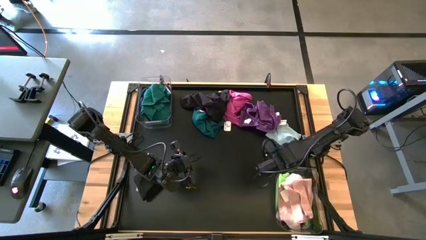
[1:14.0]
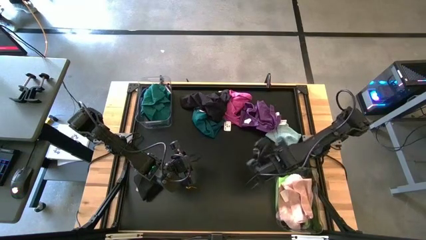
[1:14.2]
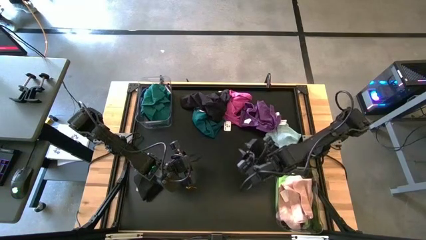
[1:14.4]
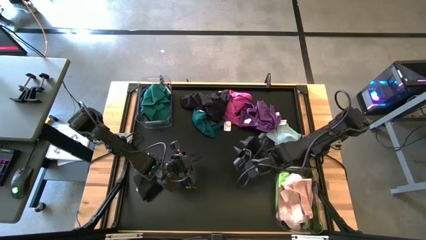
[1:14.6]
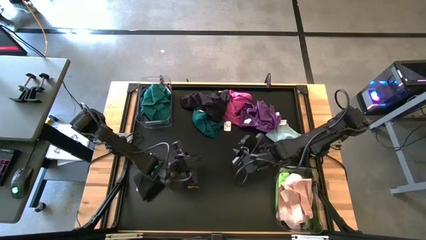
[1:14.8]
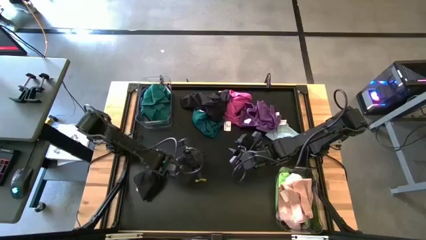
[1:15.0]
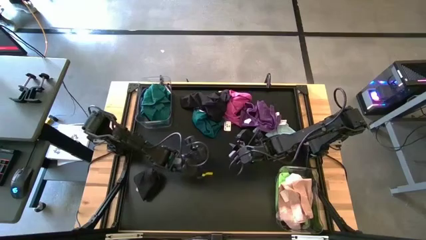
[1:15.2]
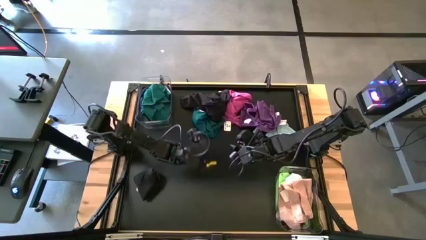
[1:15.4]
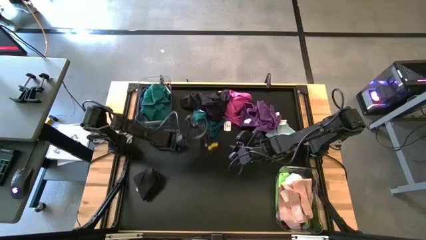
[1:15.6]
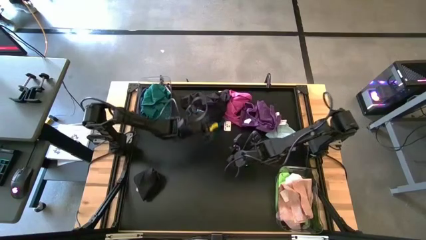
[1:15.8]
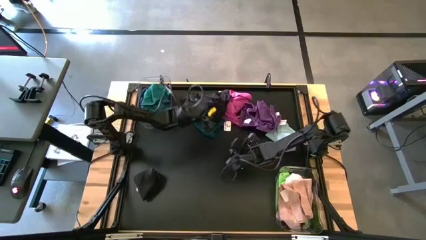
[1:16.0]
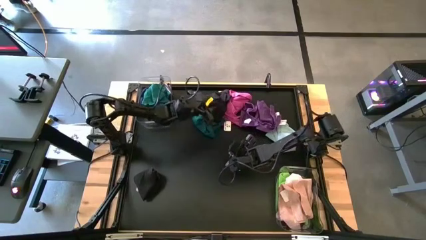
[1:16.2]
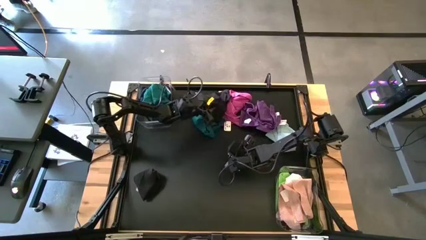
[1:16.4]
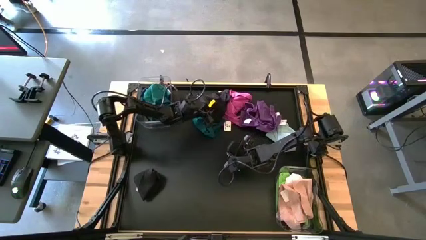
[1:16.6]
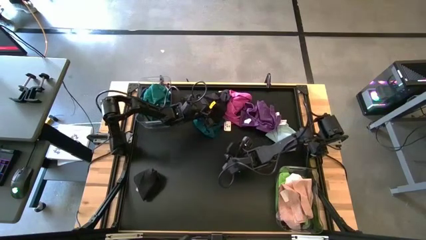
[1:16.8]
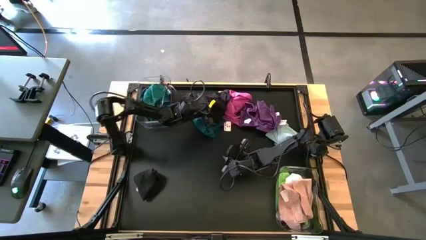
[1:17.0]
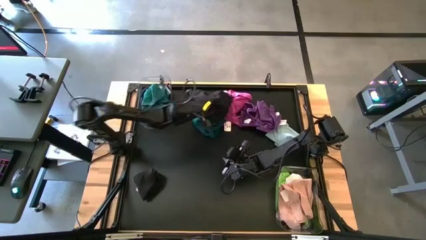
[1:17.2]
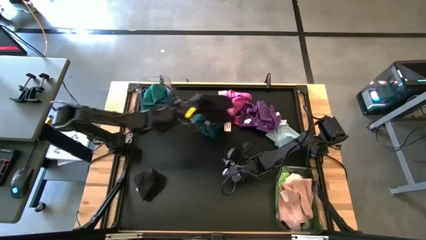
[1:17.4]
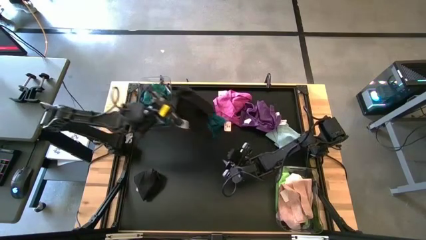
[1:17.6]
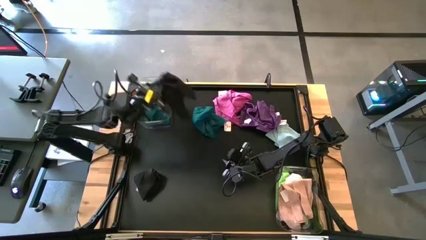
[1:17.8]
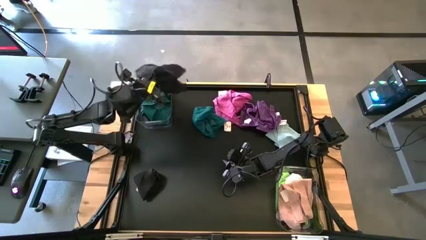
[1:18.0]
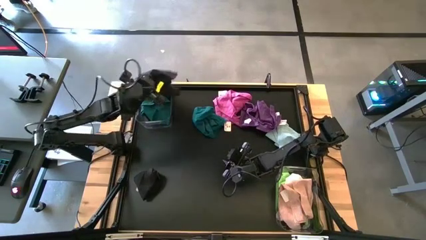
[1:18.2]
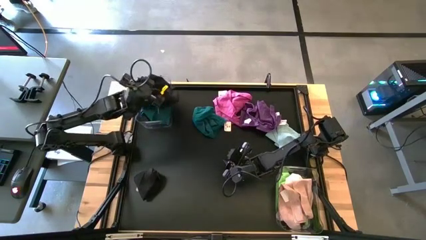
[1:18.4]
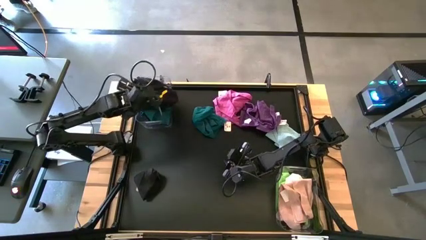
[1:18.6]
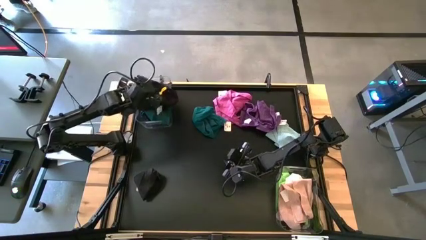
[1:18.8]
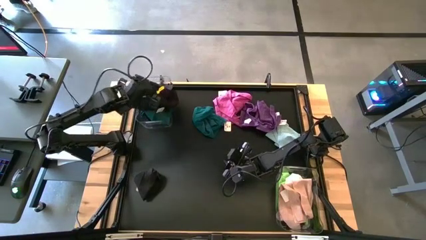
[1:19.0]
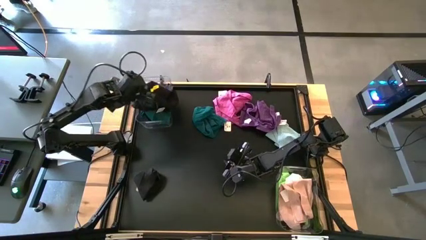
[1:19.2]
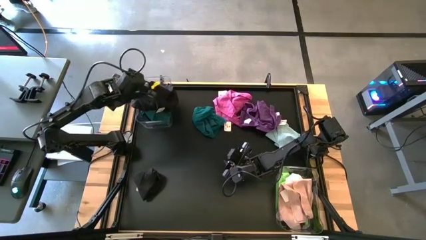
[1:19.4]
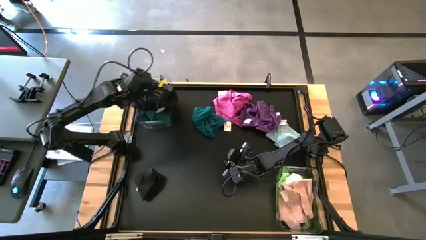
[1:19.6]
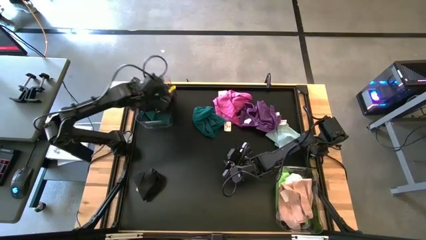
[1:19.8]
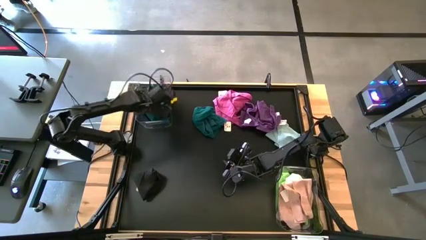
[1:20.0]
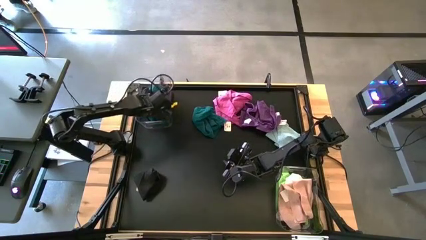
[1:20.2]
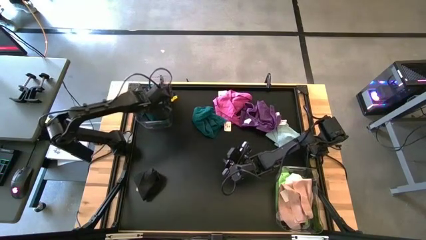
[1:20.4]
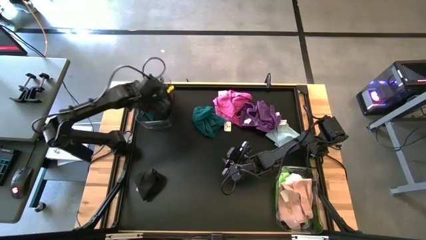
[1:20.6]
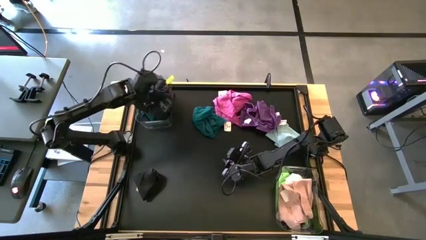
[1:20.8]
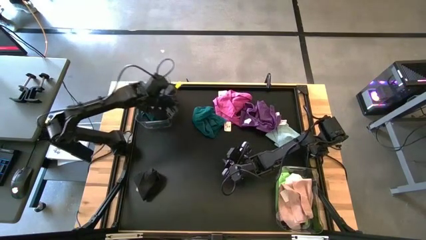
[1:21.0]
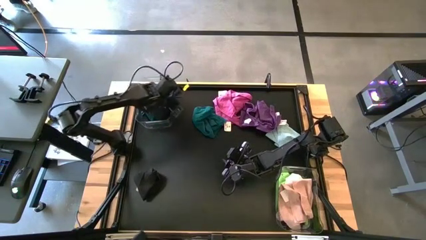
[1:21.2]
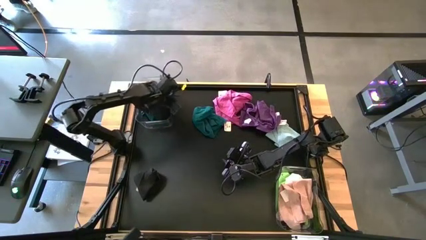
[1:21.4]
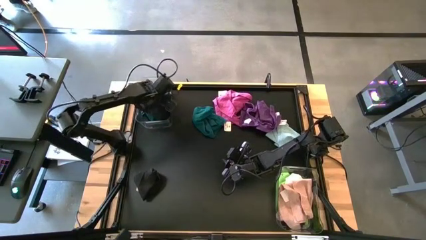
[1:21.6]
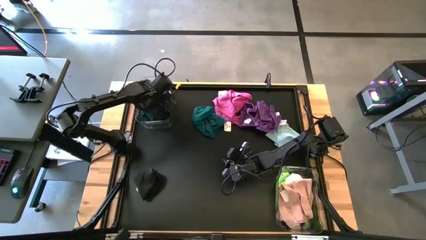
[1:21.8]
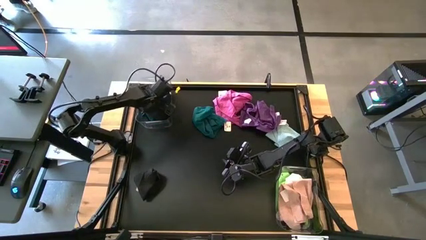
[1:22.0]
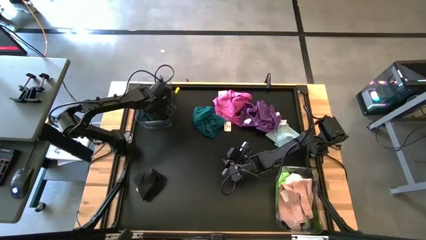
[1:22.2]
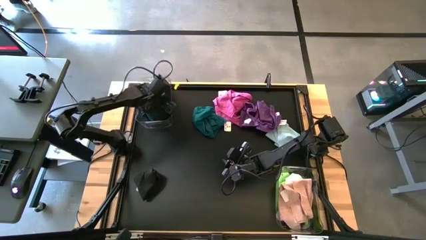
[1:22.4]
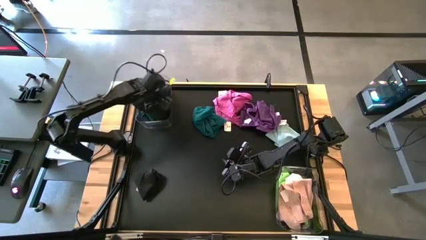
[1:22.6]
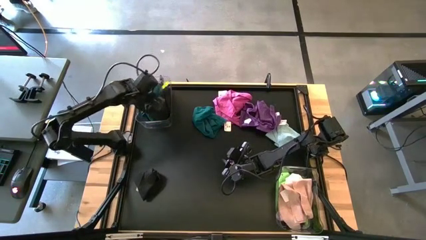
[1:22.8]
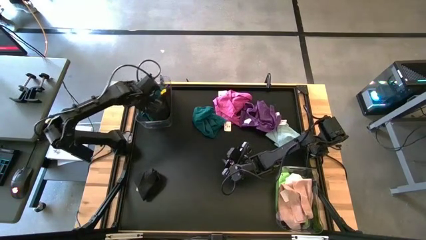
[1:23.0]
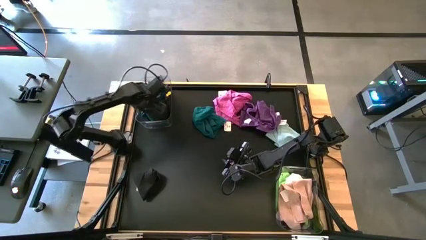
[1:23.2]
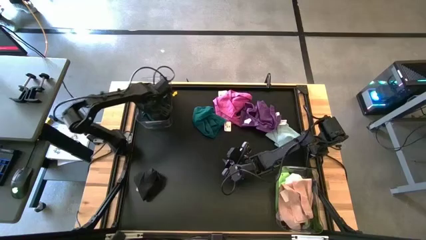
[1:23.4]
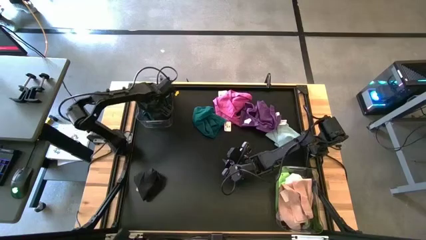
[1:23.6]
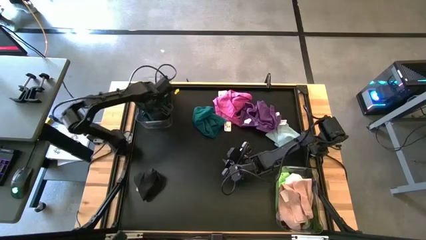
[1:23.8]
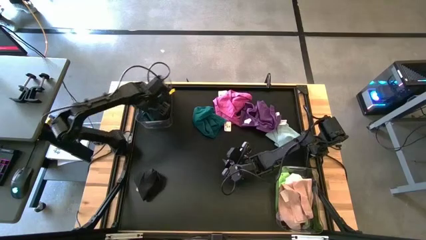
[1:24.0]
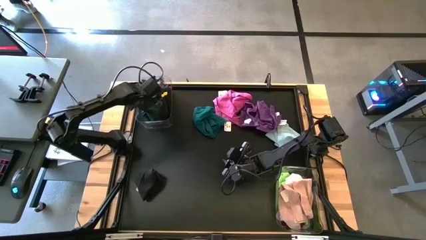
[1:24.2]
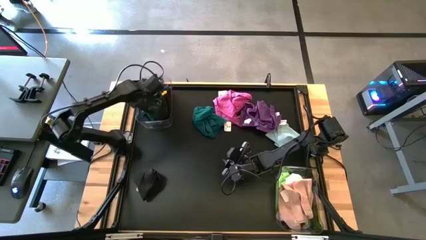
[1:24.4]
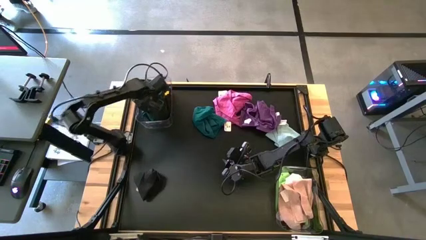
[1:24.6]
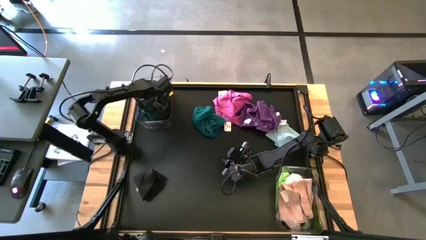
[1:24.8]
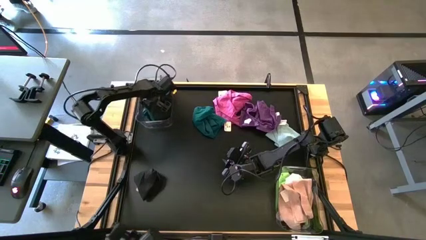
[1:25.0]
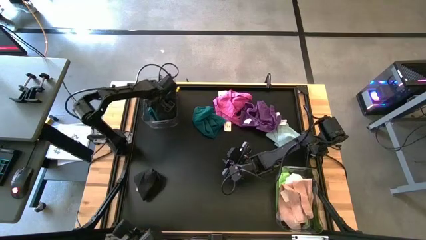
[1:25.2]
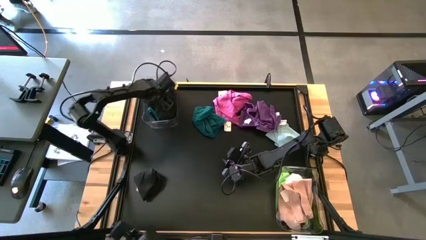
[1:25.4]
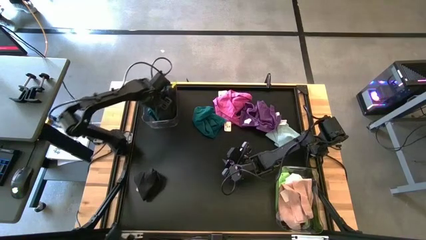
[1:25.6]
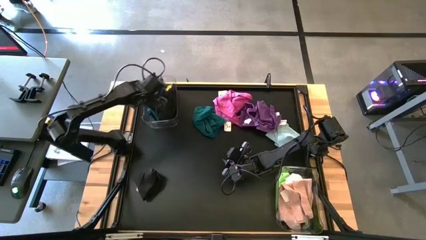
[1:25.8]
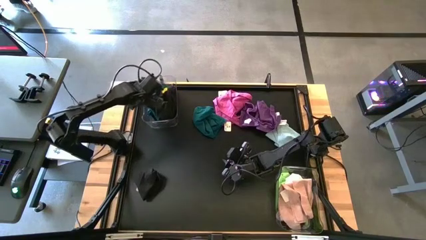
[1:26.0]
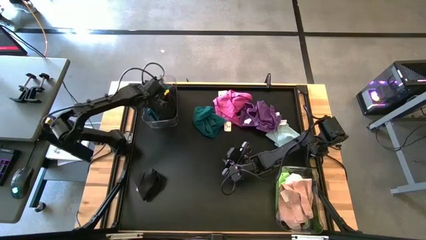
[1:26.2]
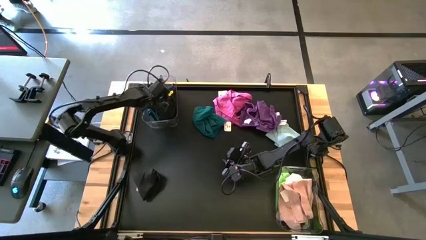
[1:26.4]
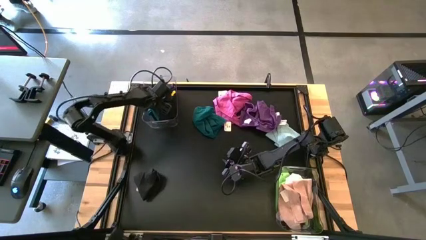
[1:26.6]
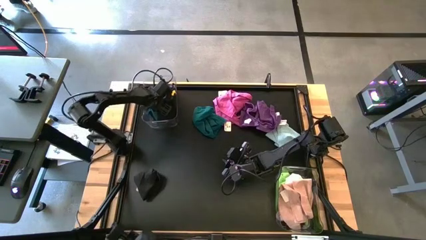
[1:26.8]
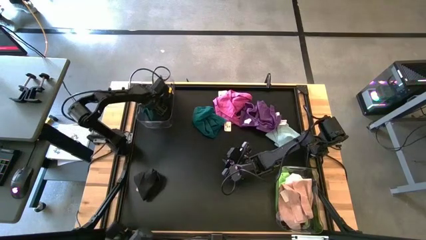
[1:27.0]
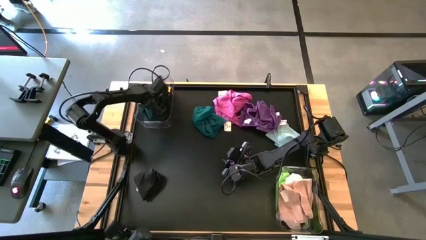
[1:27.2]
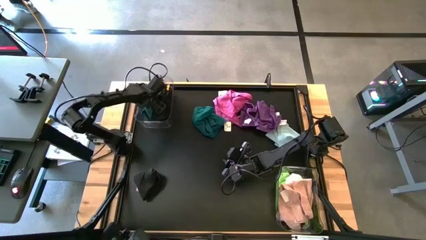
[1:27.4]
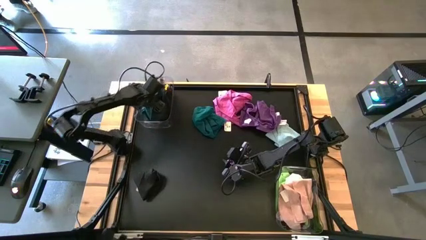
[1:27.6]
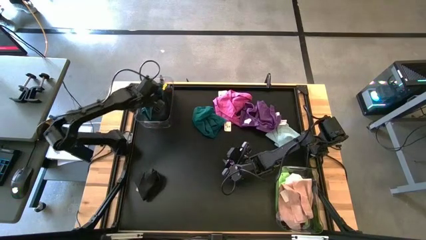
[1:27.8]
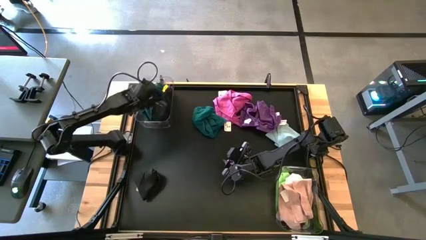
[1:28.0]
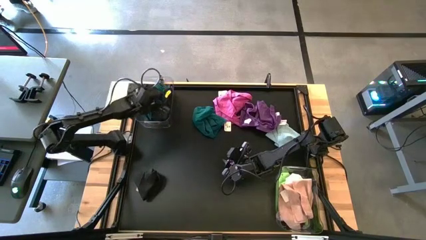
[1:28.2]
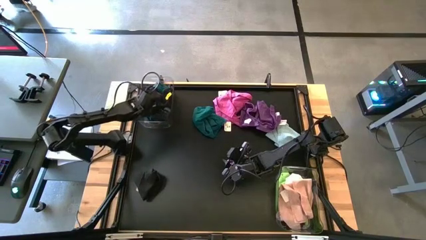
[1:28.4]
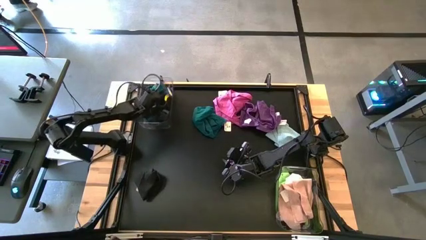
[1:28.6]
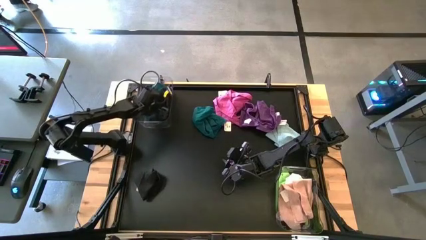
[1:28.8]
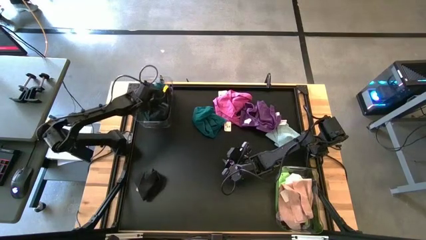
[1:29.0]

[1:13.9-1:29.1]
Task: Sort towels by color in basket
Put the black towel into the top transparent bin
